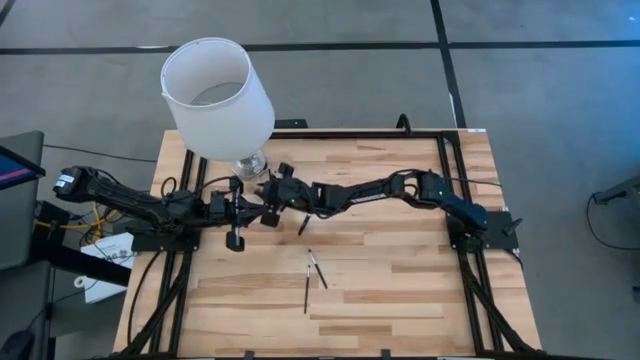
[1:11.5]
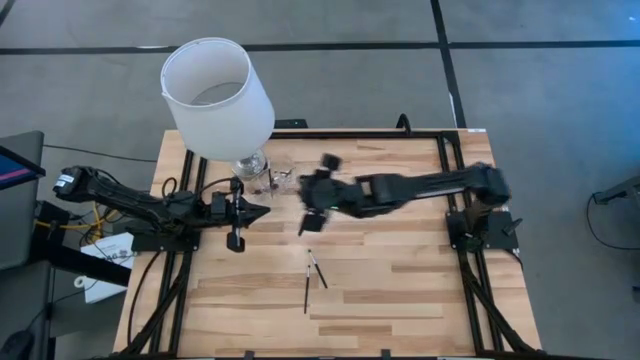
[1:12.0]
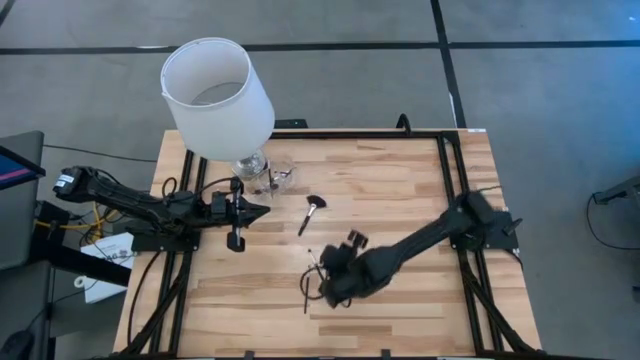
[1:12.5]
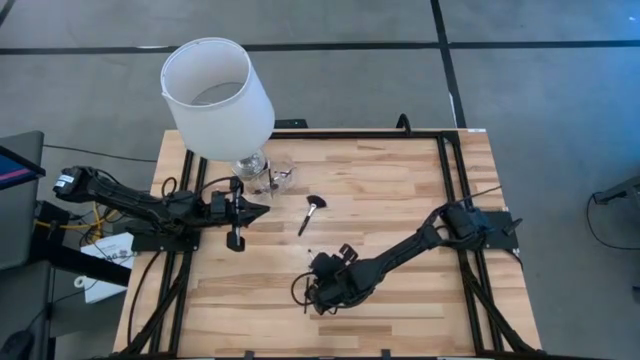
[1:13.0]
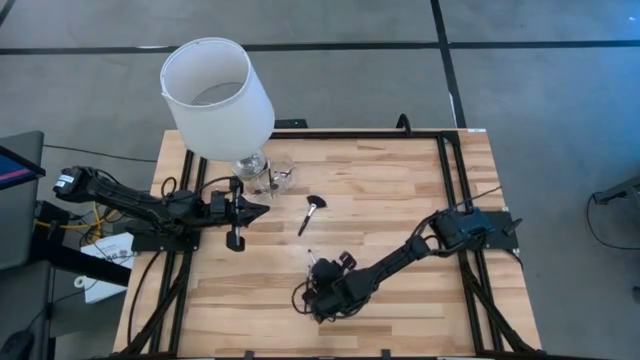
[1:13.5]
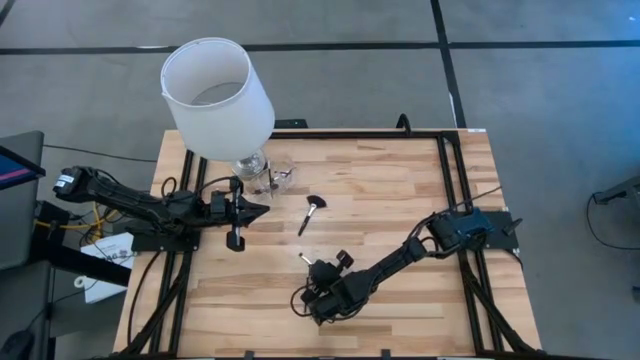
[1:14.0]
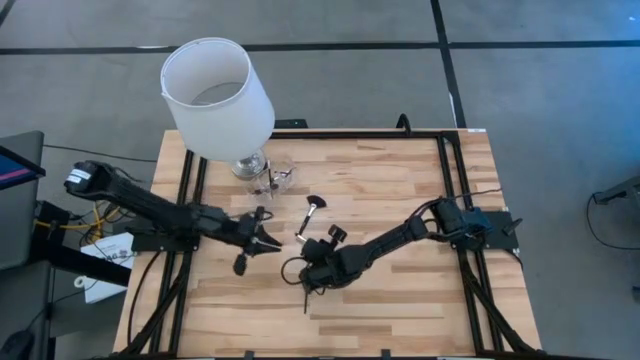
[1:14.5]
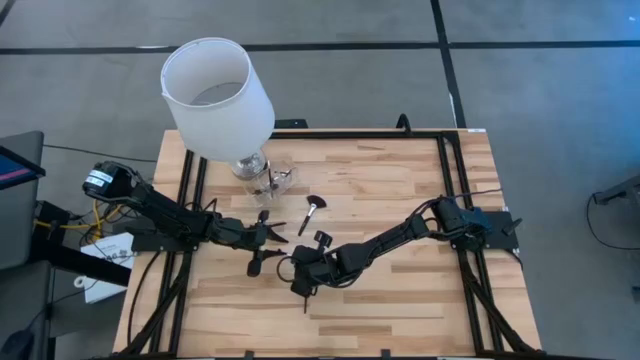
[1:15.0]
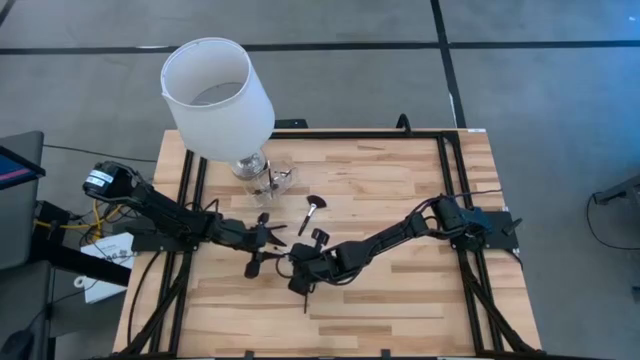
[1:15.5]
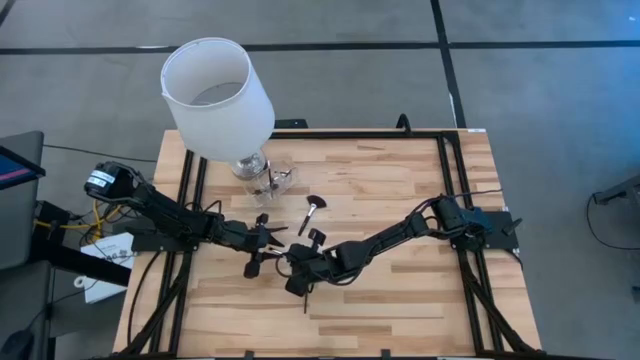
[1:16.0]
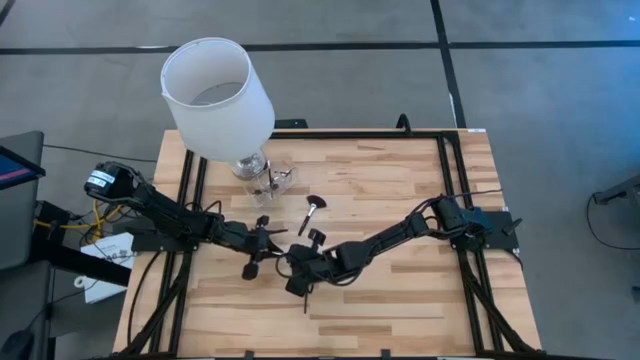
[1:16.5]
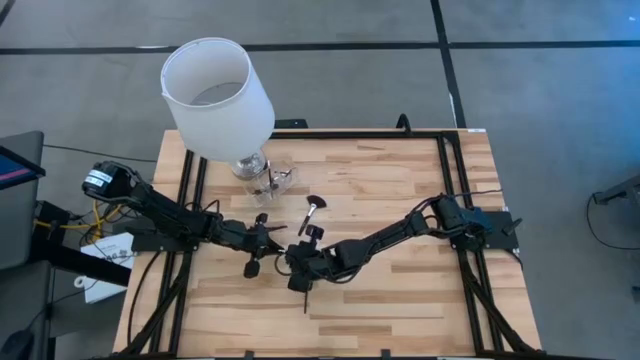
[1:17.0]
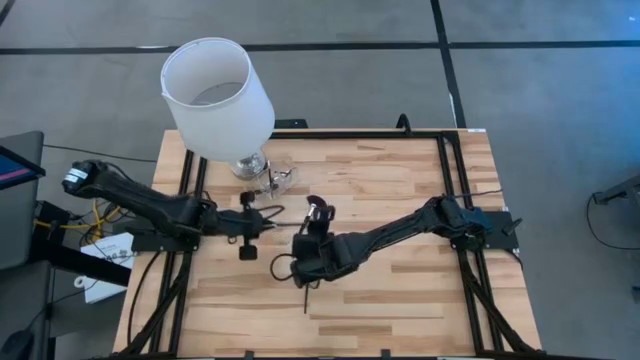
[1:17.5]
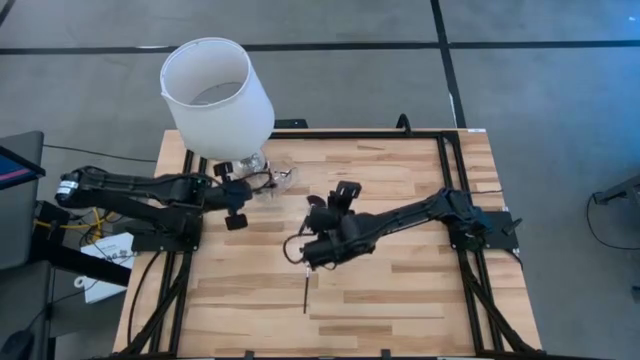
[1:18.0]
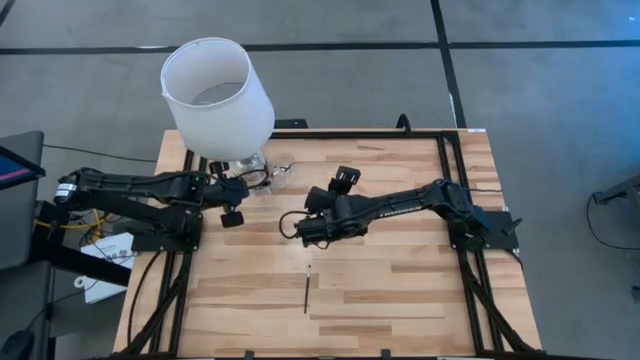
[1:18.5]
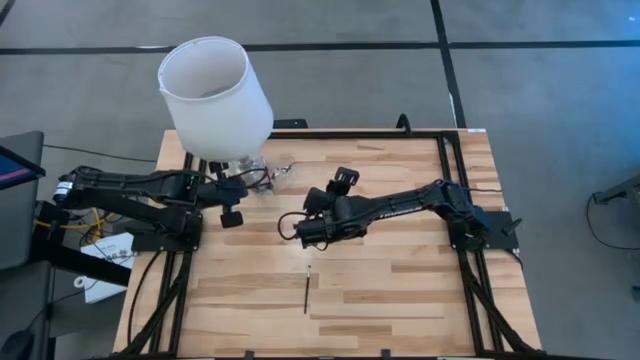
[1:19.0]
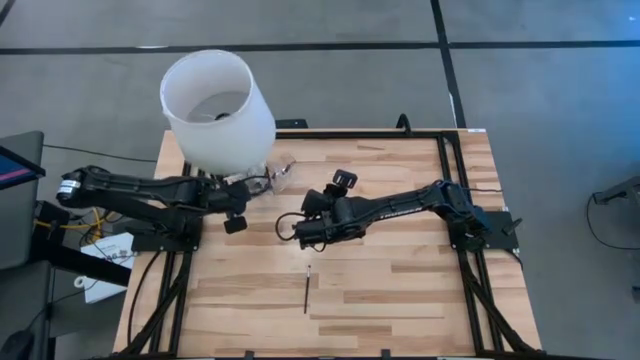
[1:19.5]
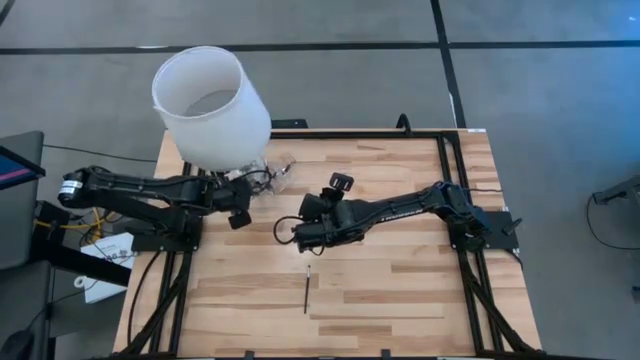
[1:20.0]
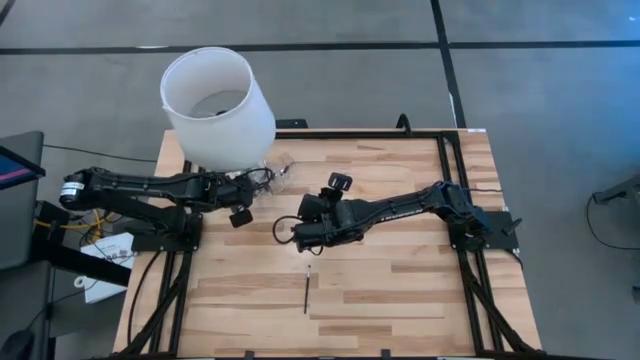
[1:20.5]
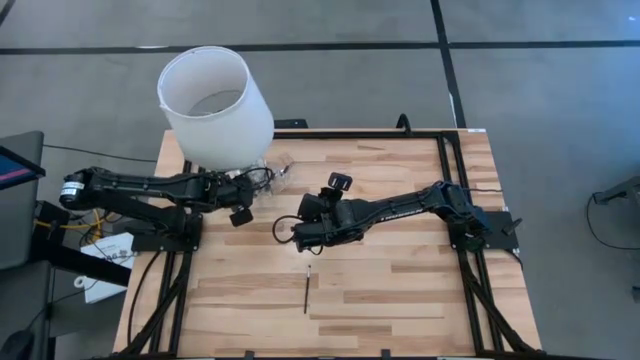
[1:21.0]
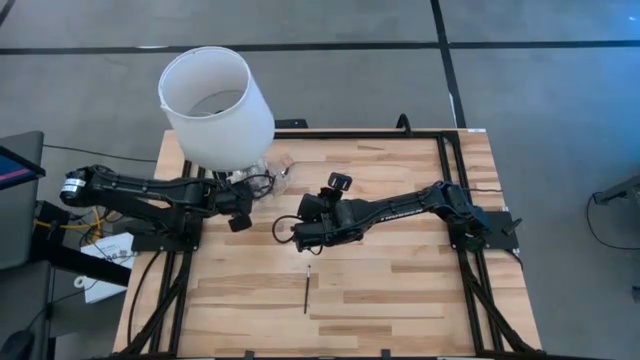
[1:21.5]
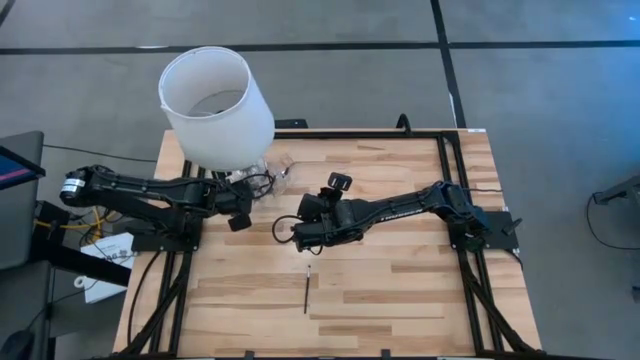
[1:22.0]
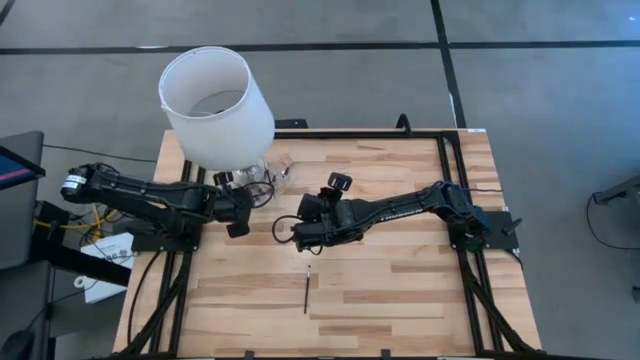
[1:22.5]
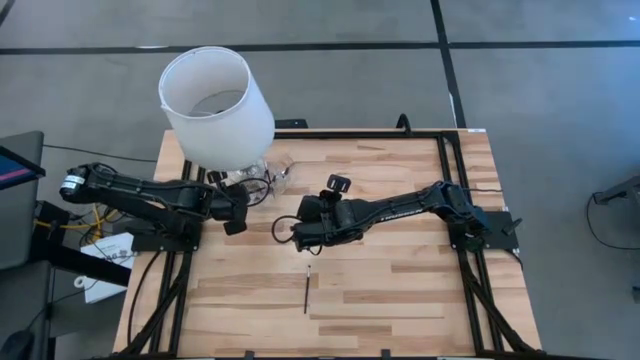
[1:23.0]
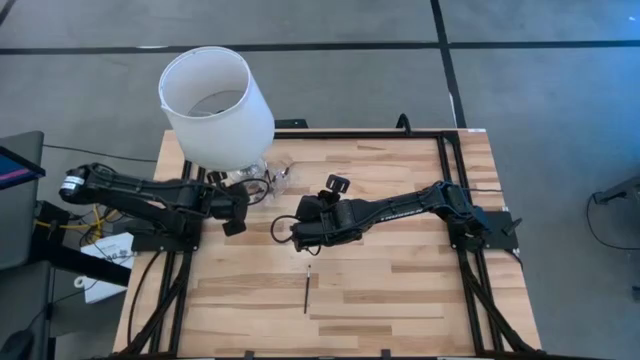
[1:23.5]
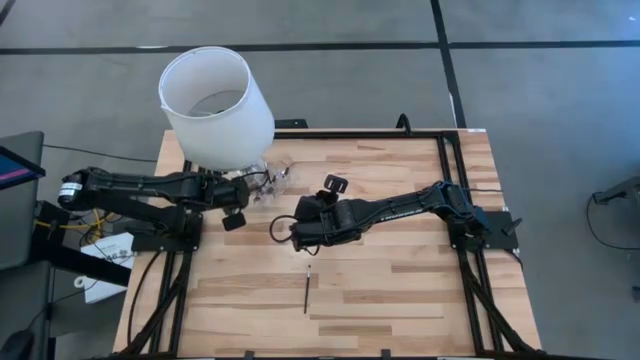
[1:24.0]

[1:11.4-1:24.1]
Task: Put items in baskets/containers
Put the black eyeshadow brush in the transparent organizer

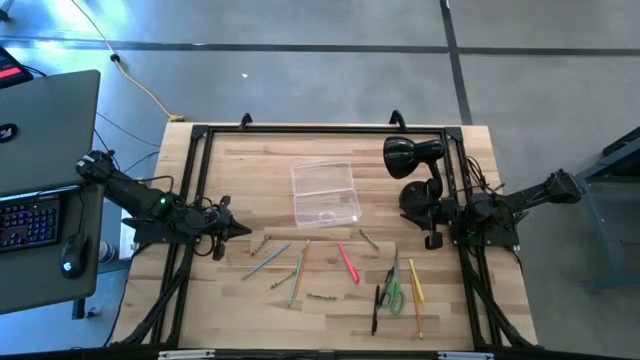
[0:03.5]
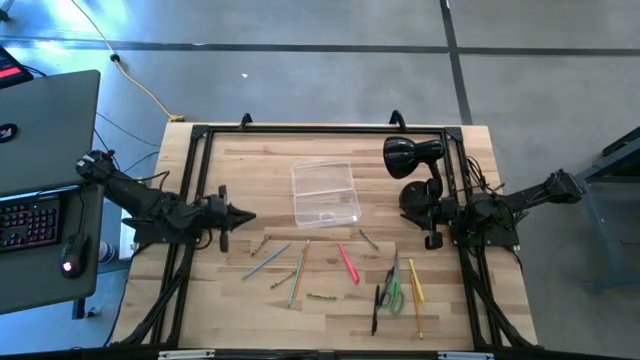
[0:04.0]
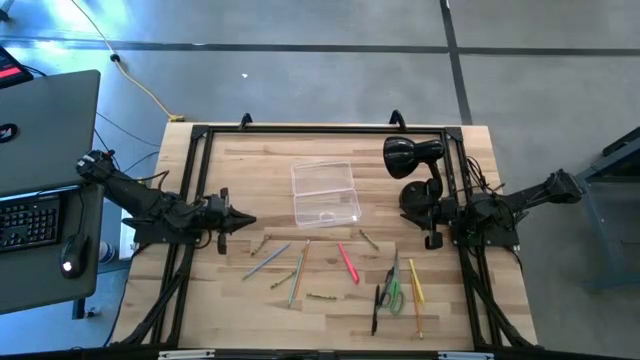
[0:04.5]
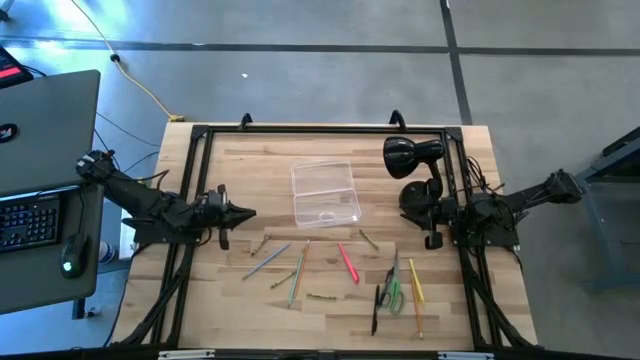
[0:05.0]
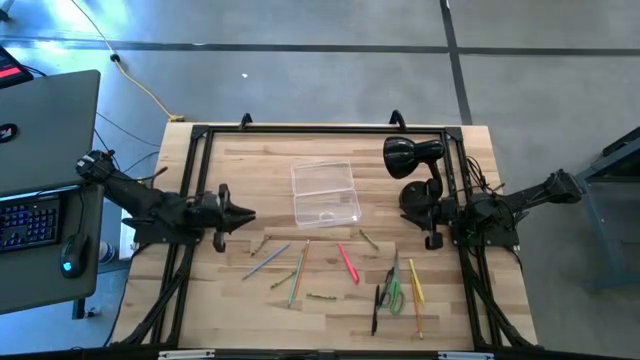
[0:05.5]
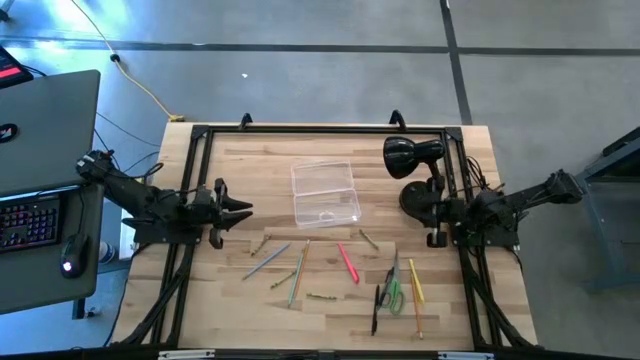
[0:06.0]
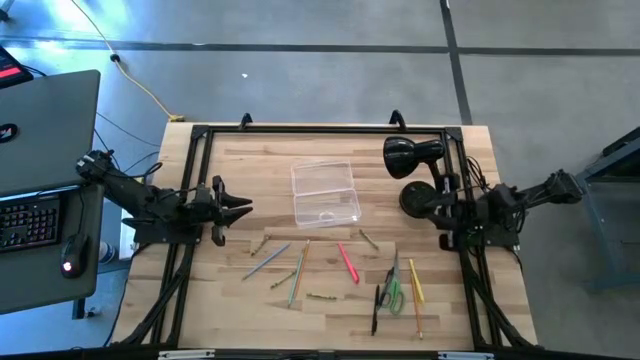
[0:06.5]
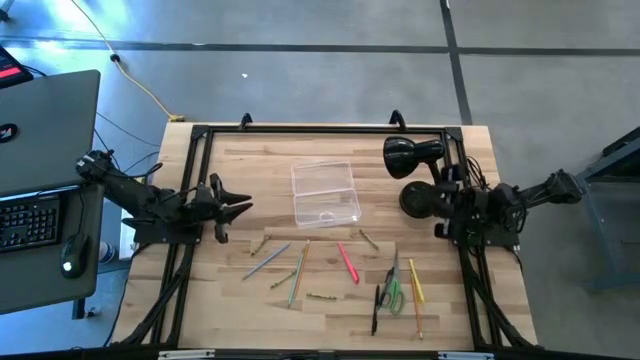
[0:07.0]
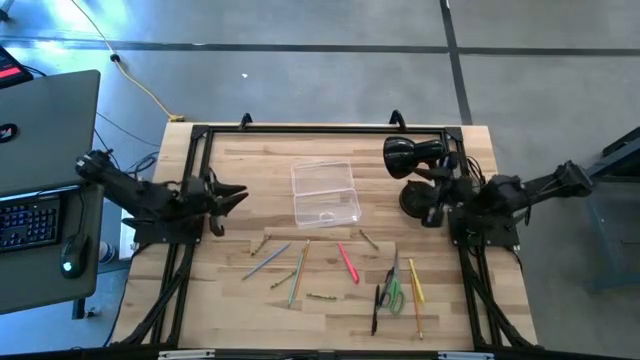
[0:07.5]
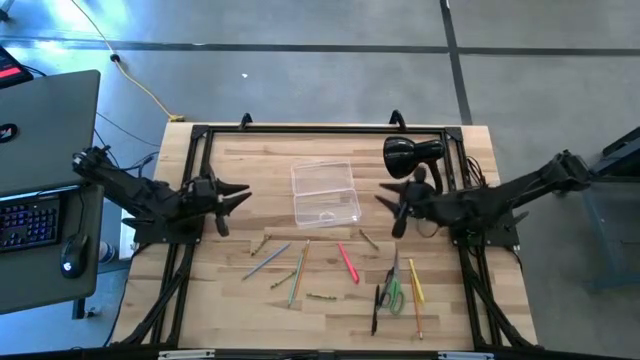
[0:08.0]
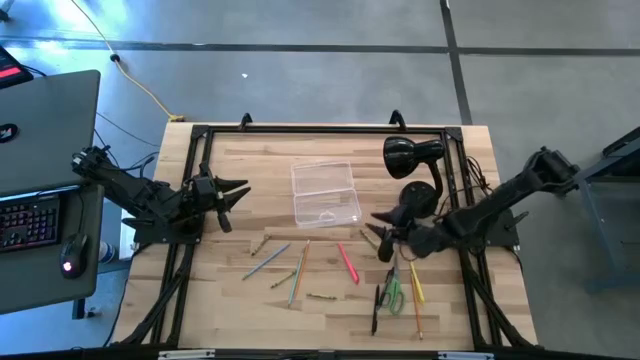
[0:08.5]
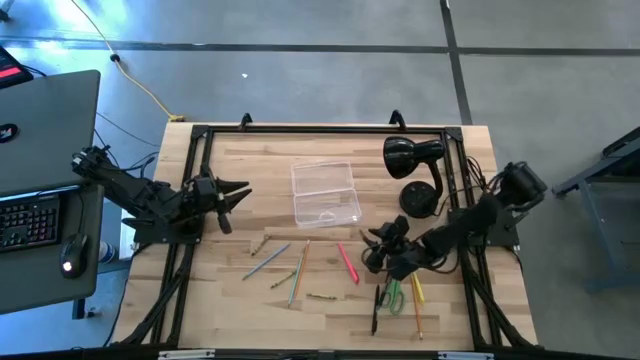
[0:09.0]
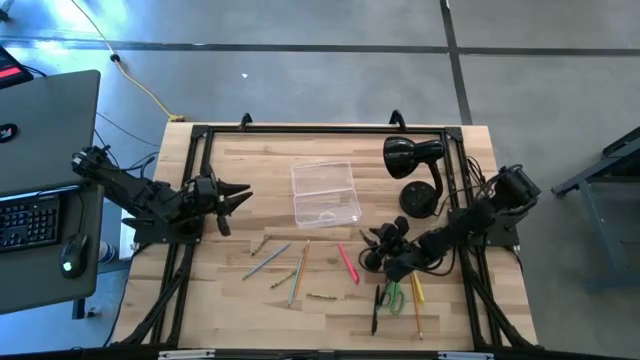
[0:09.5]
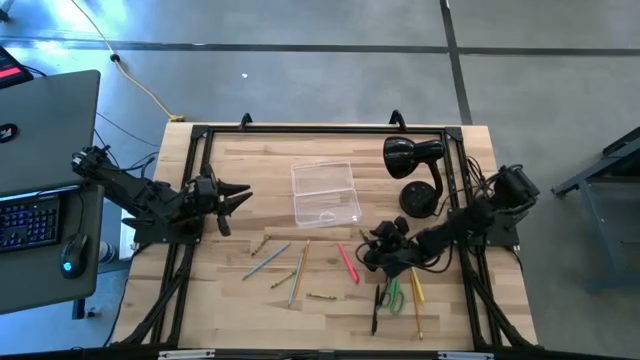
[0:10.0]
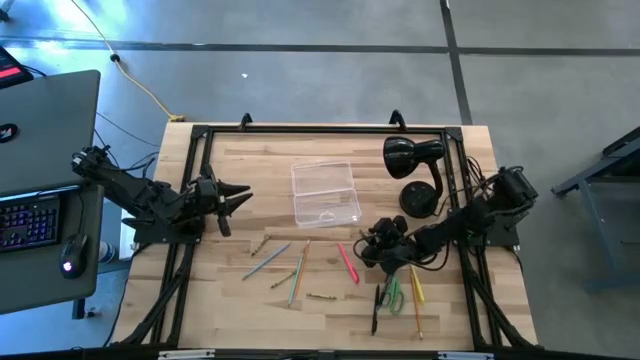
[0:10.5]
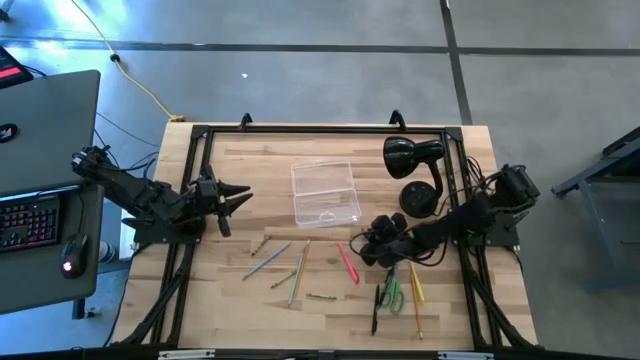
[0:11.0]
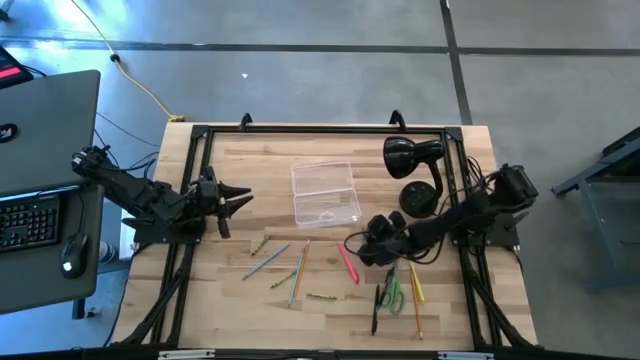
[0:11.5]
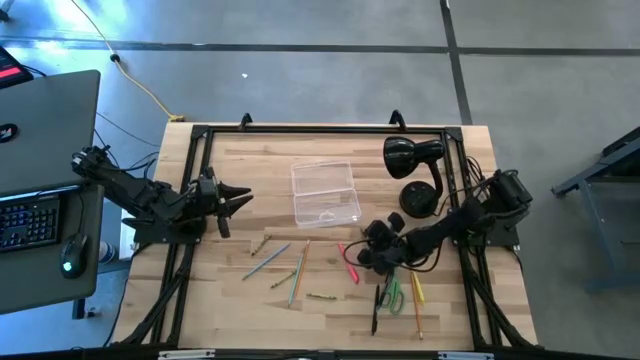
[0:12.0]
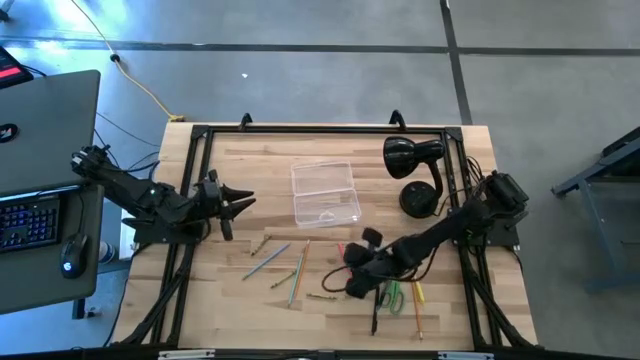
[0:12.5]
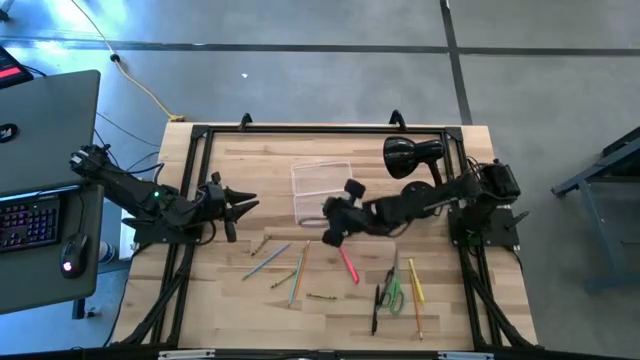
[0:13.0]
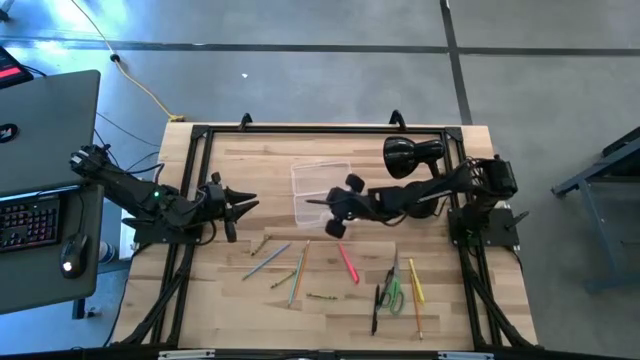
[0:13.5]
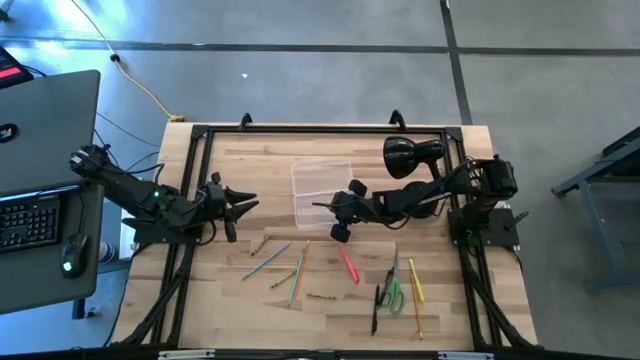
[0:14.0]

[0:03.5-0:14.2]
Task: Pick & place school supplies into a supply box
Put the green crayon into the transparent supply box
